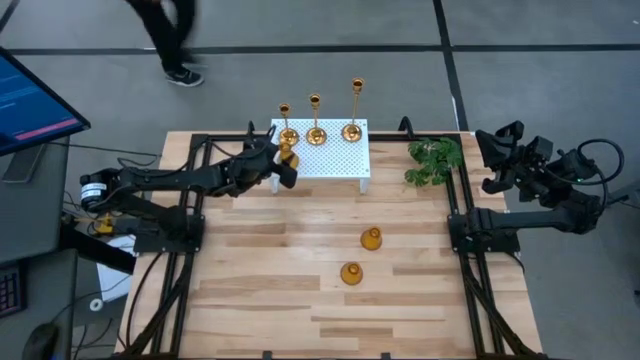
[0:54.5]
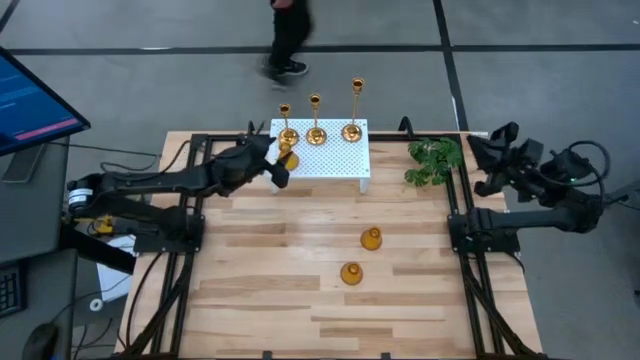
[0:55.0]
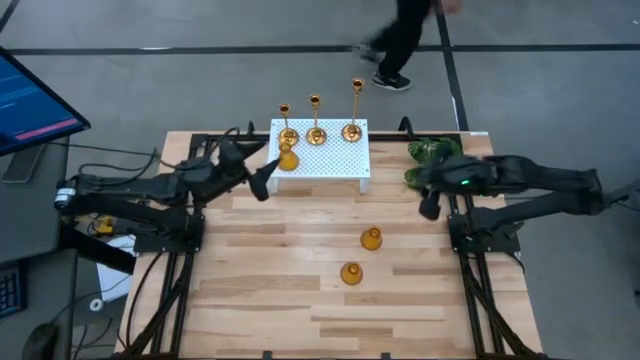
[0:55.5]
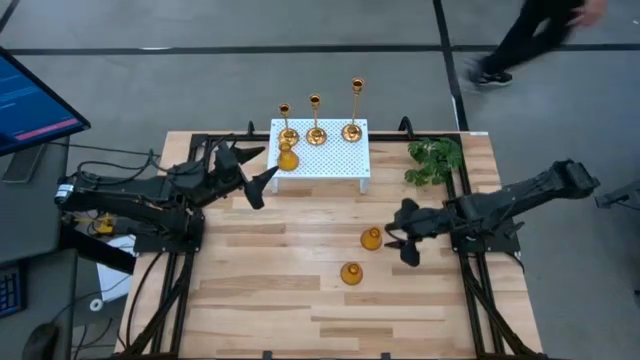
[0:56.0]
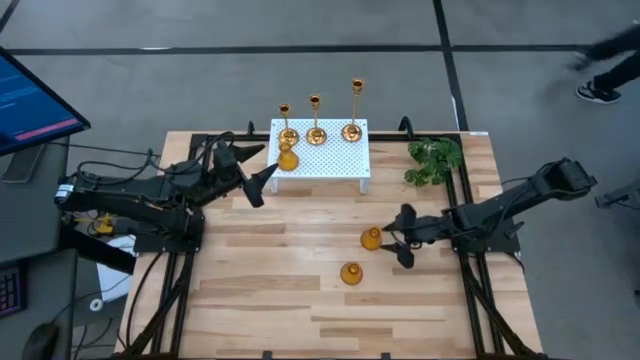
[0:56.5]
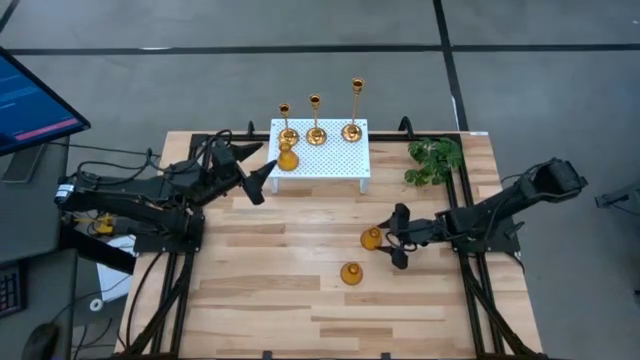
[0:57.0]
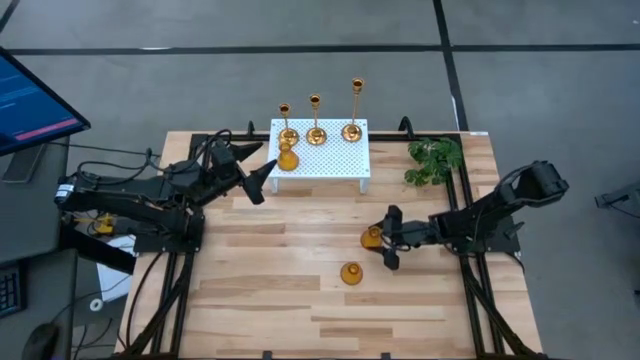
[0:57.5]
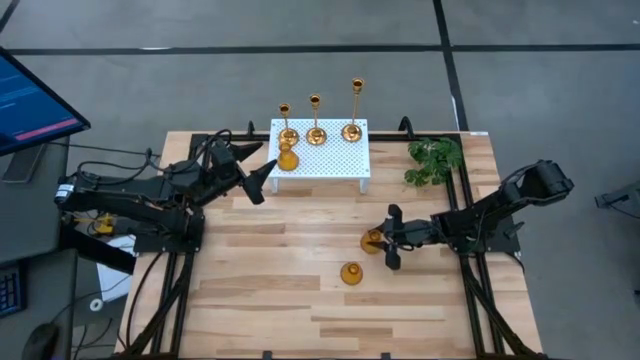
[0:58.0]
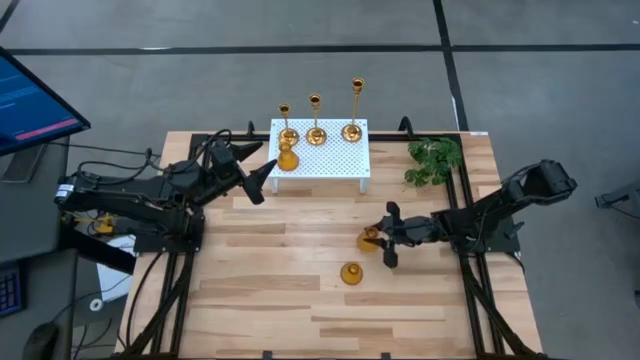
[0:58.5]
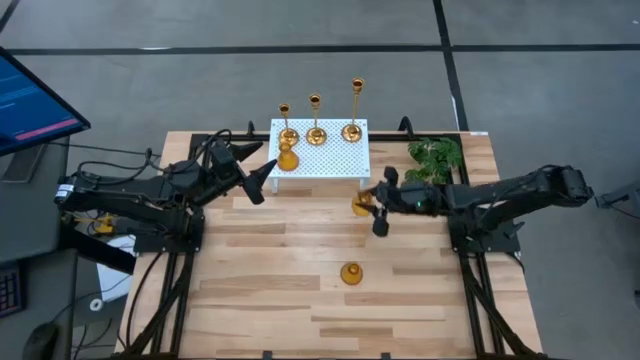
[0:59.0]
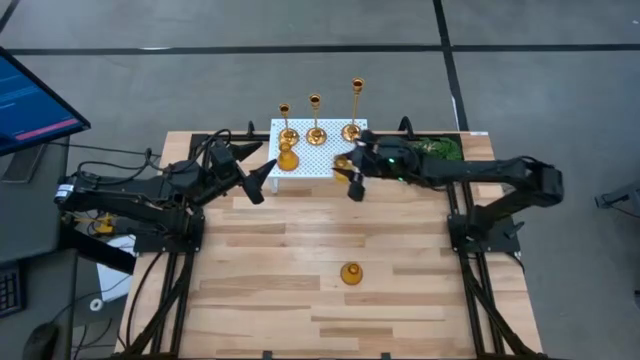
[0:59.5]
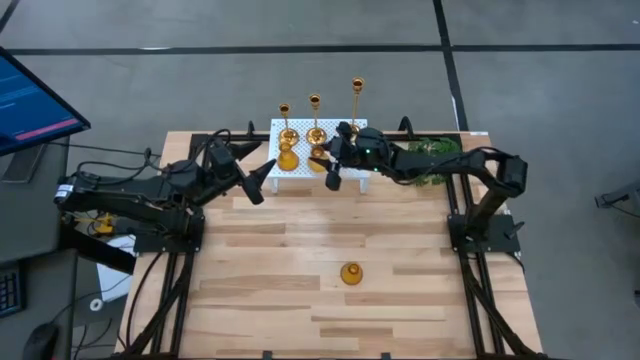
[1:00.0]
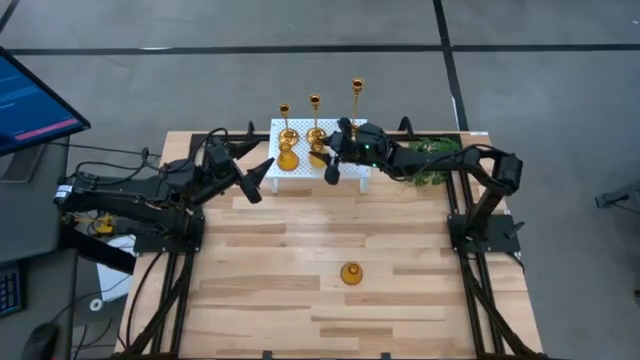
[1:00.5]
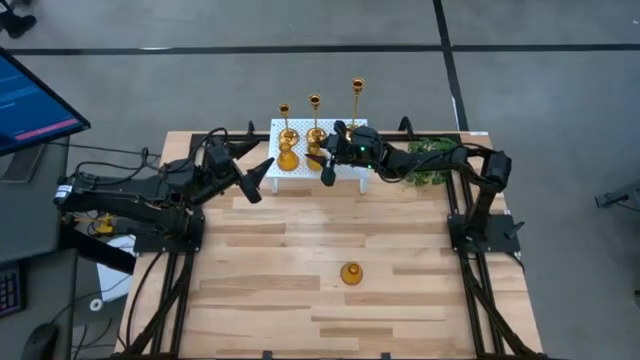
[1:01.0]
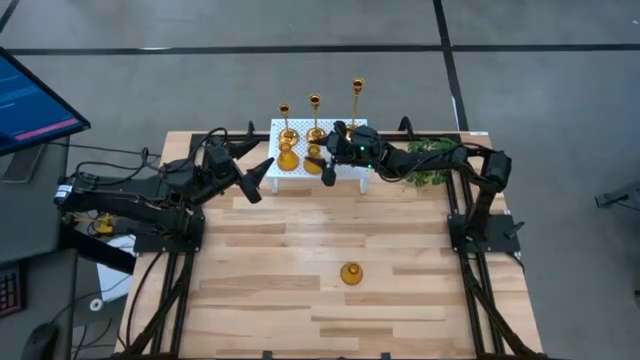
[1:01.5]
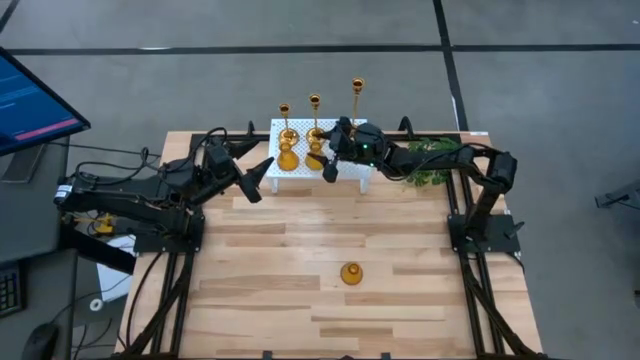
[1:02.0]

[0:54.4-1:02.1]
Task: Pick & Place candle stick holders
Put the top orange candle holder on the shelf aligned with the medium gold candle holder

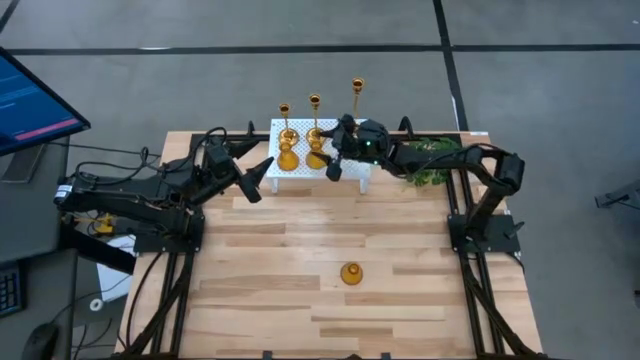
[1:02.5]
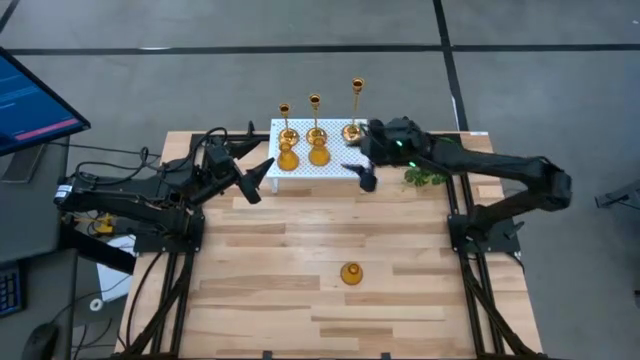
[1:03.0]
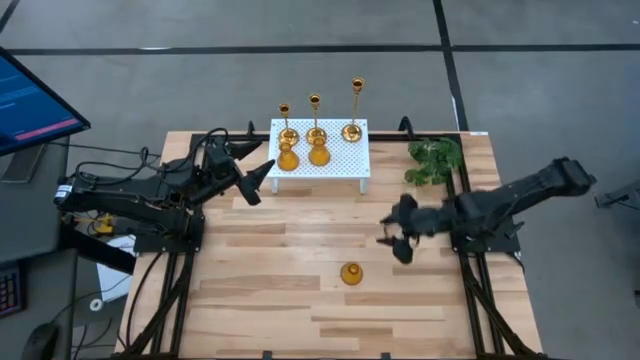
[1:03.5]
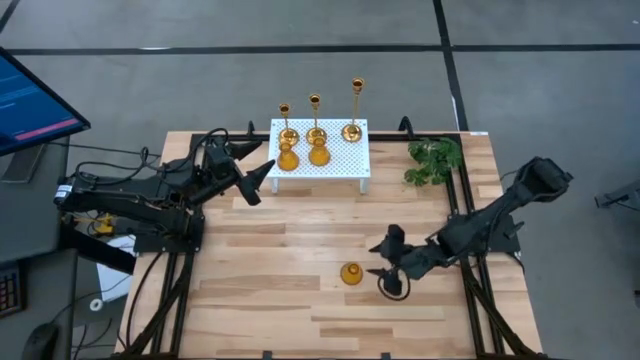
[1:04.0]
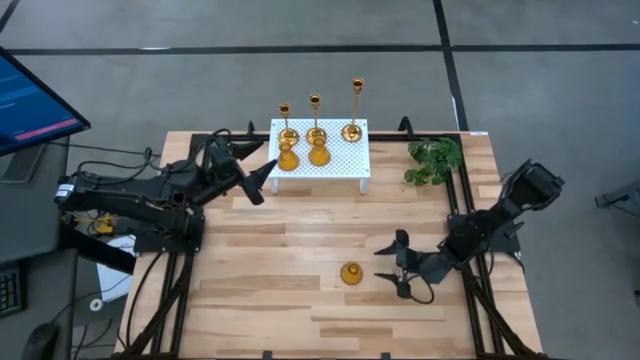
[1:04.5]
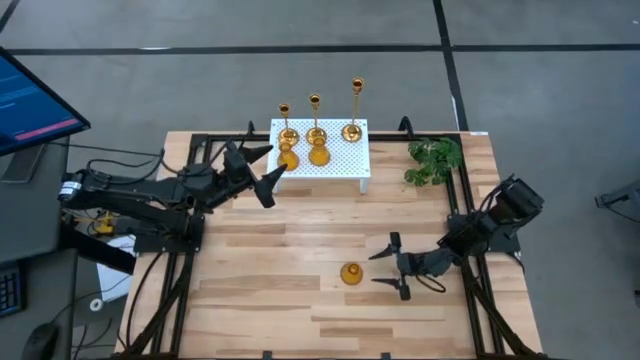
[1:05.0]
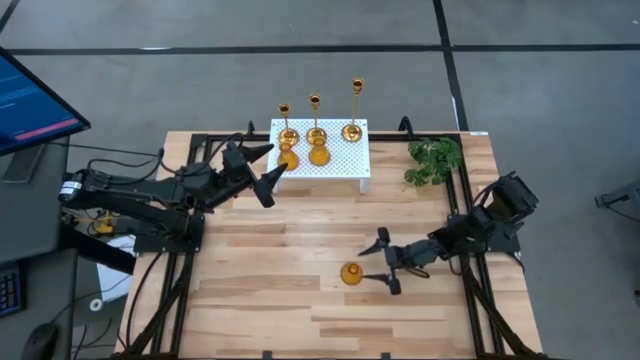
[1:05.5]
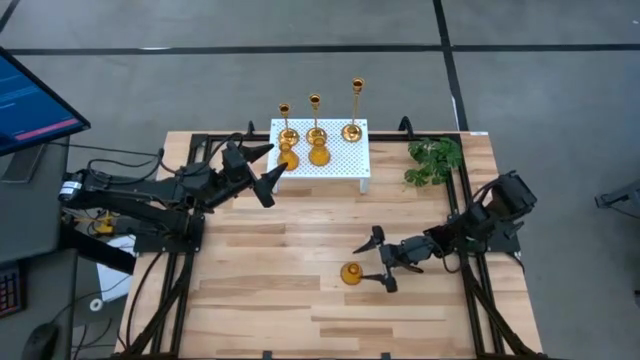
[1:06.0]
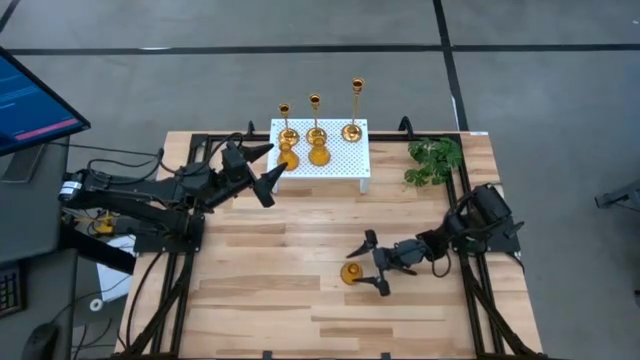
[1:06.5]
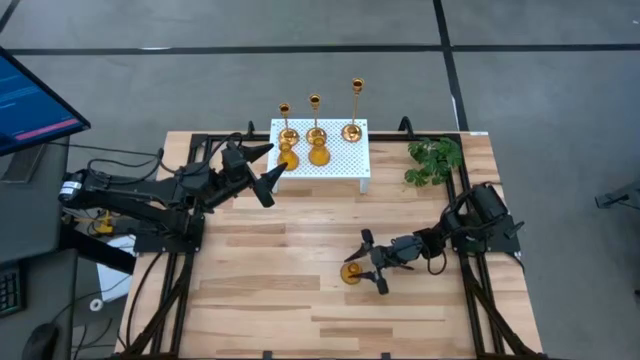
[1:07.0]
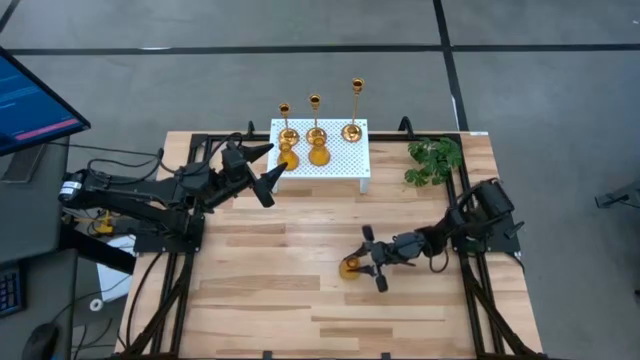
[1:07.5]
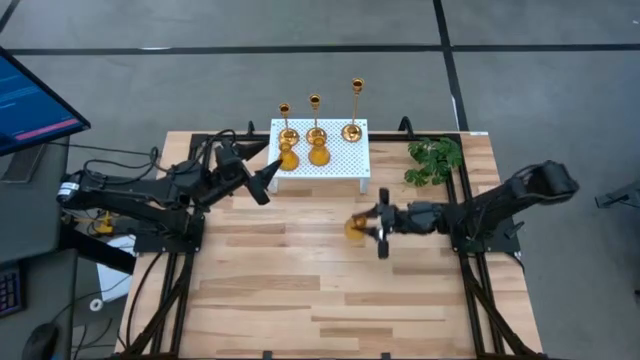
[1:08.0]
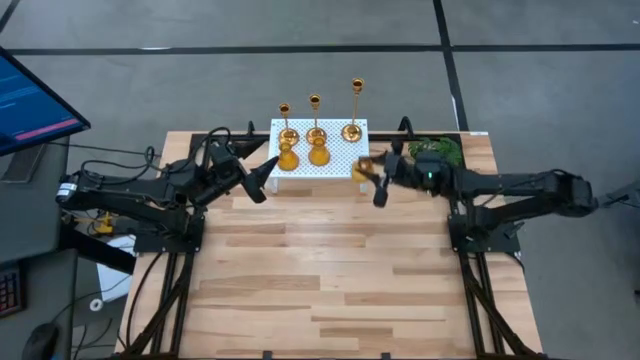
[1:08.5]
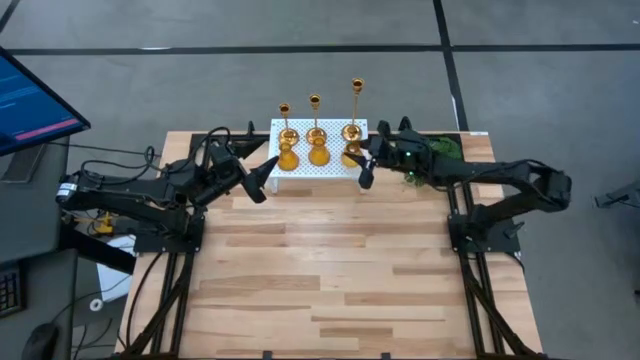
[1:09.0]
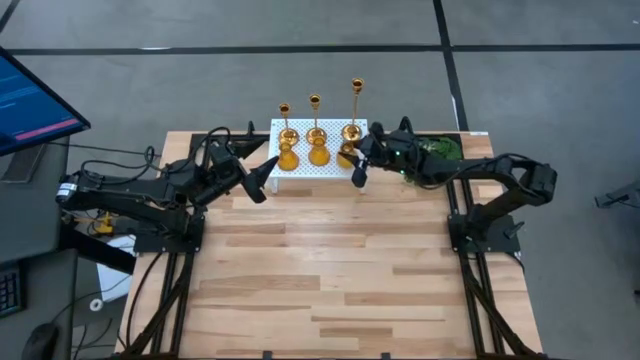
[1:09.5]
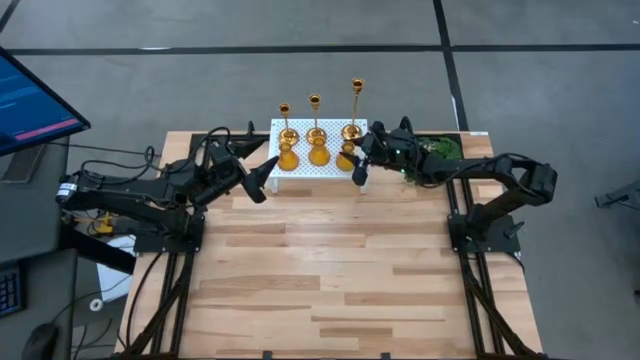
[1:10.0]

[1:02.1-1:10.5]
Put the orange candle holder on the shelf aligned with the large gold candle holder

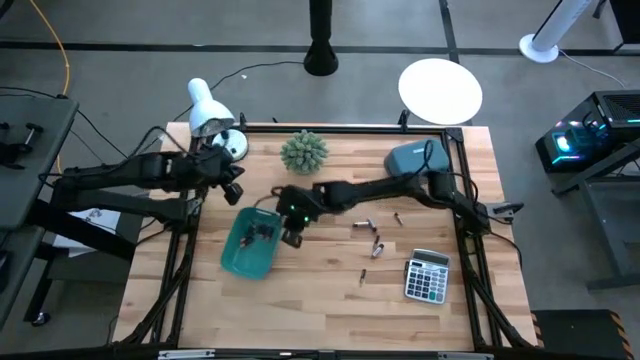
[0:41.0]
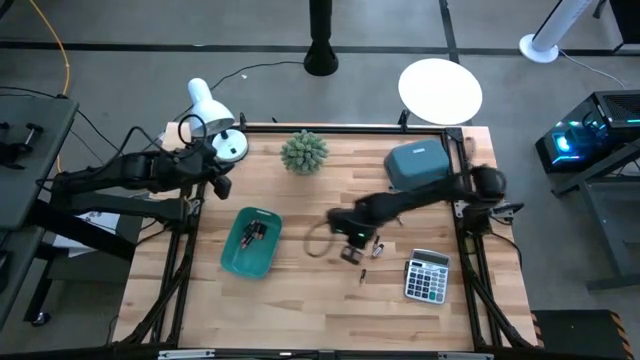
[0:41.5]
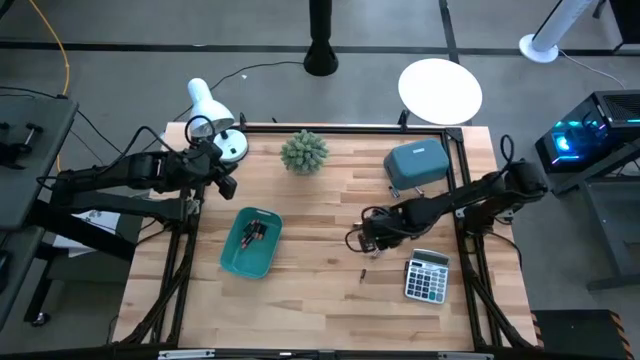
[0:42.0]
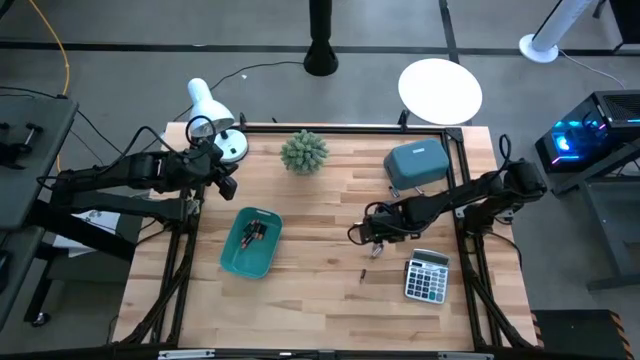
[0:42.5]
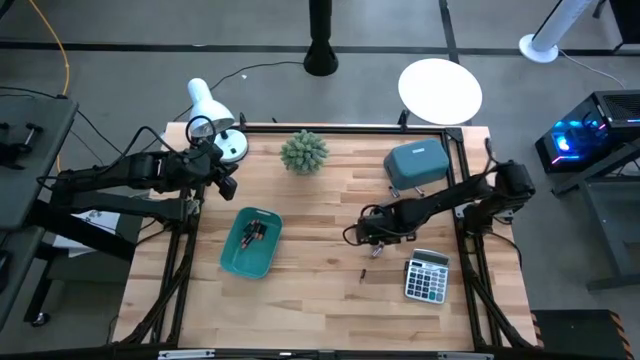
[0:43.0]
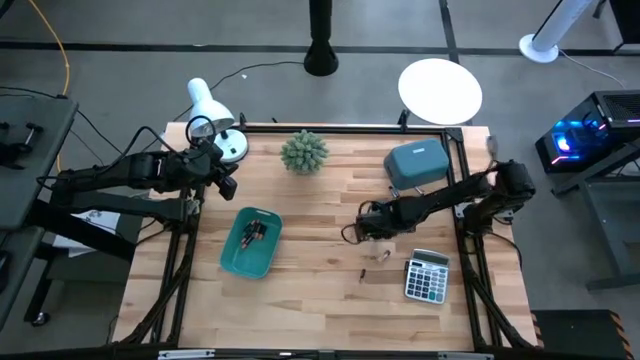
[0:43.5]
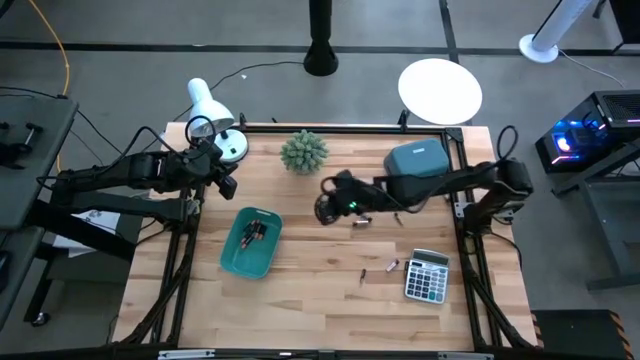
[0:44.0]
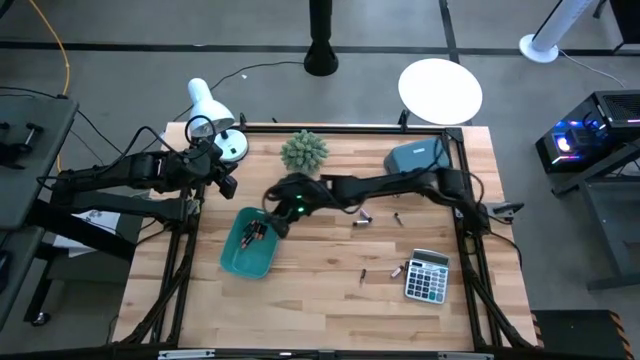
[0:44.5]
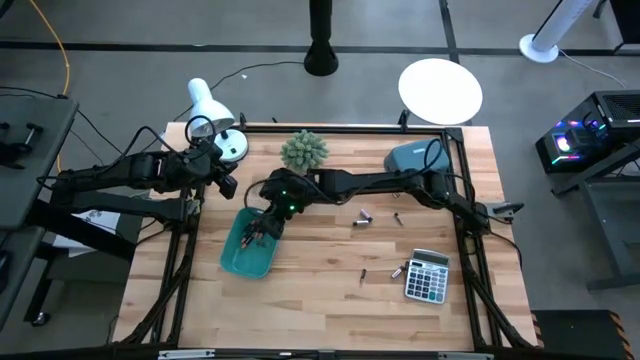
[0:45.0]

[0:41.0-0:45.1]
Task: Sort batteries
Put the black battery into the green bin

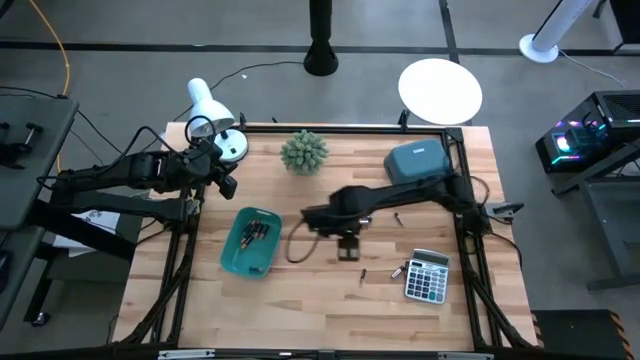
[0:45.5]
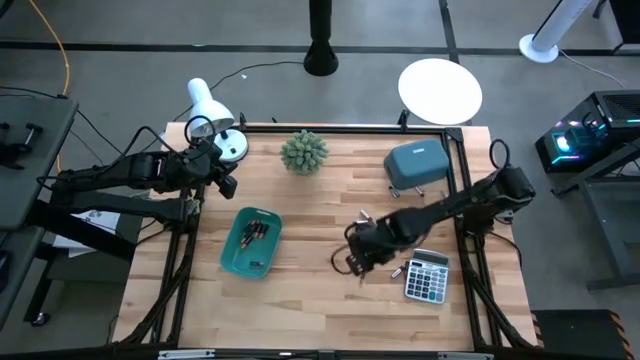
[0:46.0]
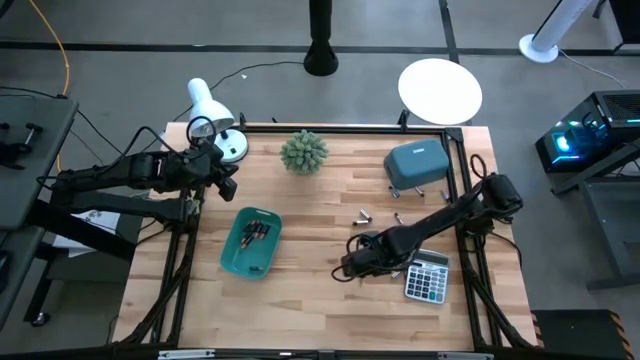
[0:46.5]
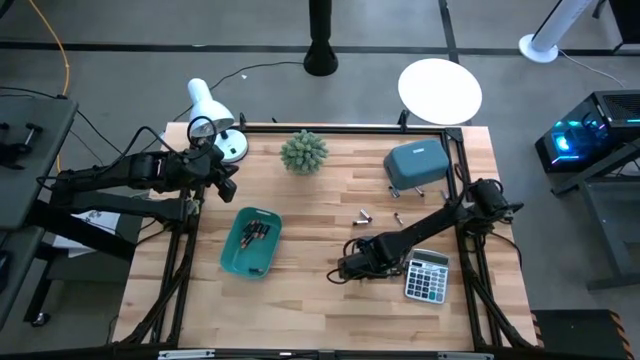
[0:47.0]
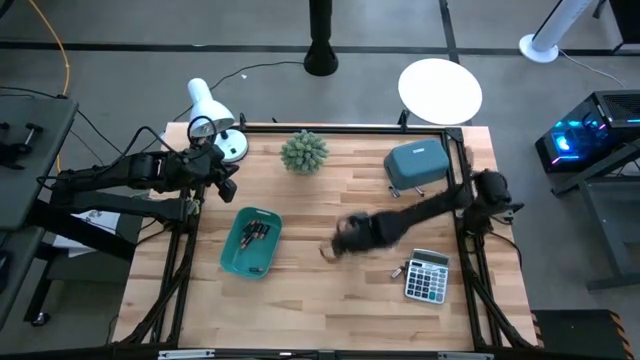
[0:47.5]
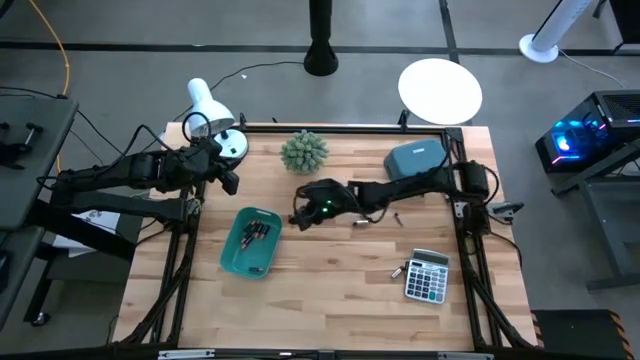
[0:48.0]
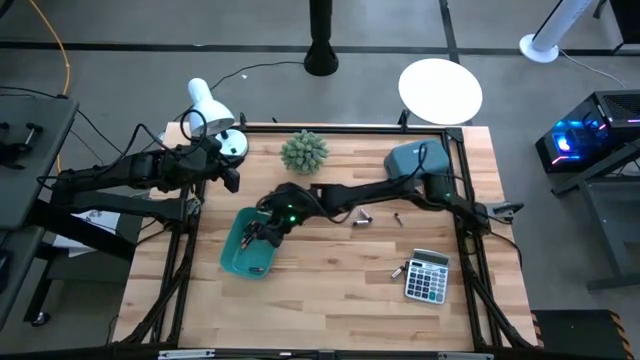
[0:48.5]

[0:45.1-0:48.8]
Put the black battery into the green bin
